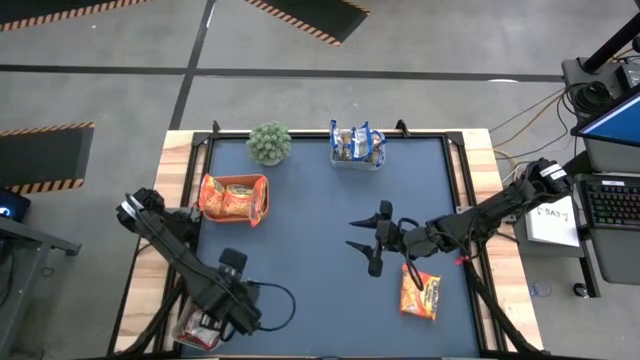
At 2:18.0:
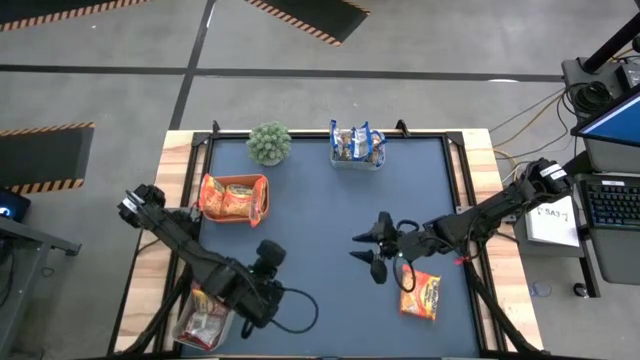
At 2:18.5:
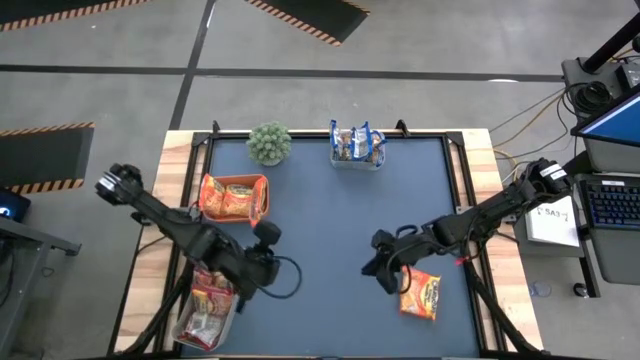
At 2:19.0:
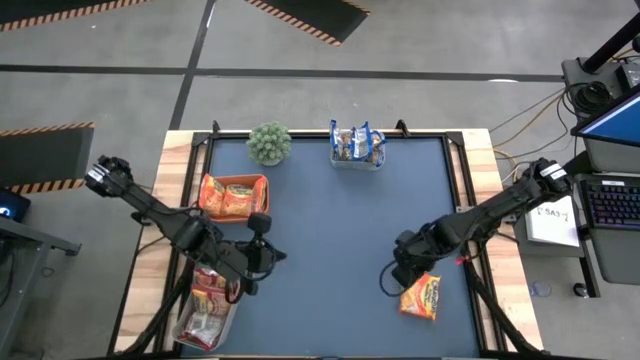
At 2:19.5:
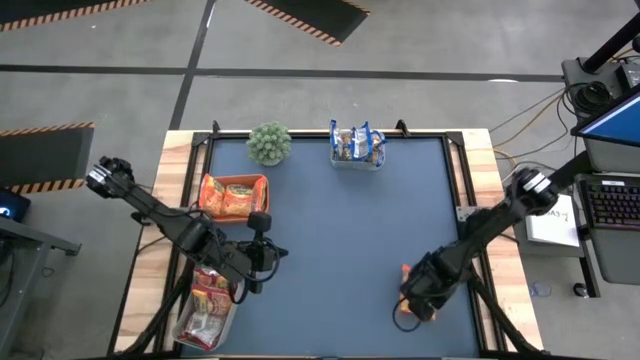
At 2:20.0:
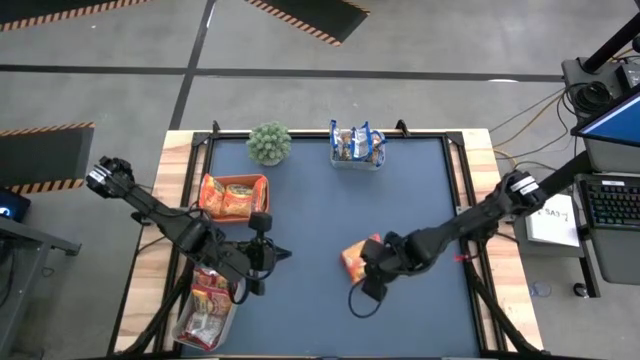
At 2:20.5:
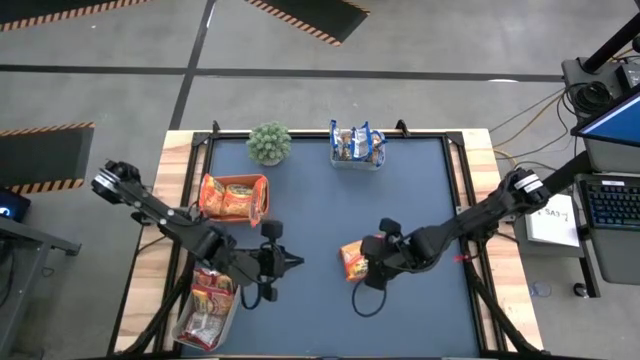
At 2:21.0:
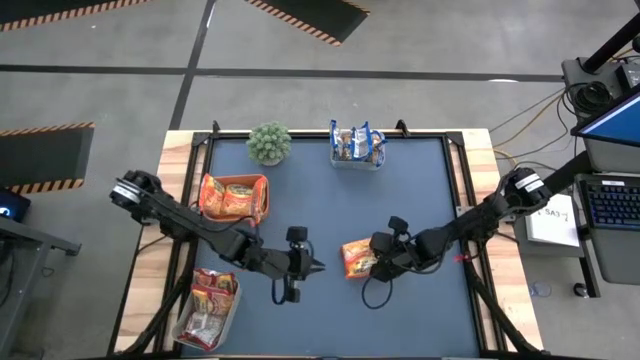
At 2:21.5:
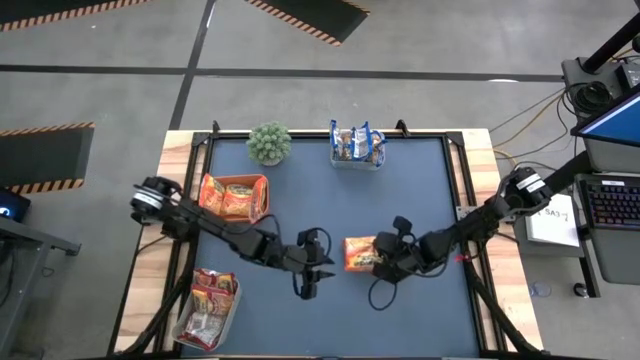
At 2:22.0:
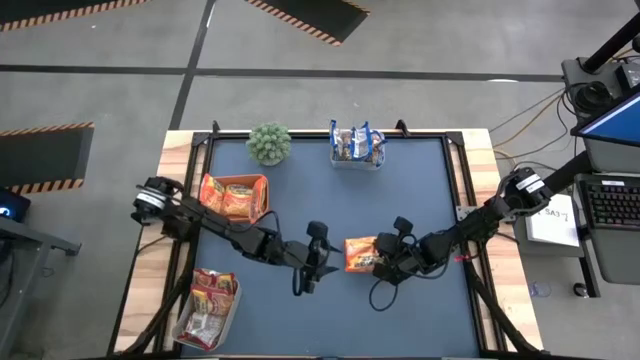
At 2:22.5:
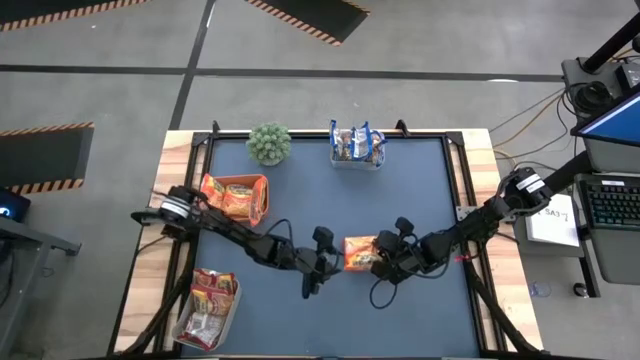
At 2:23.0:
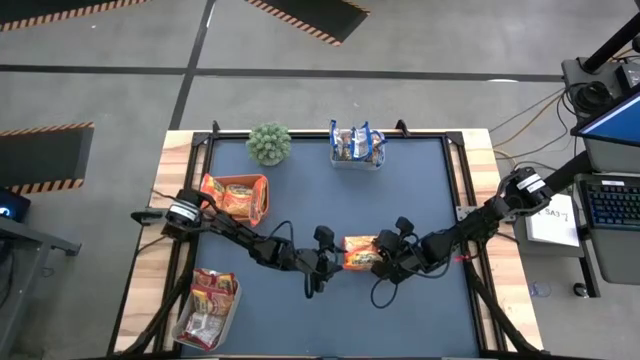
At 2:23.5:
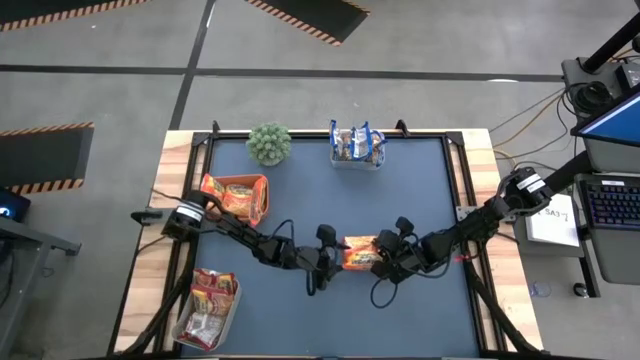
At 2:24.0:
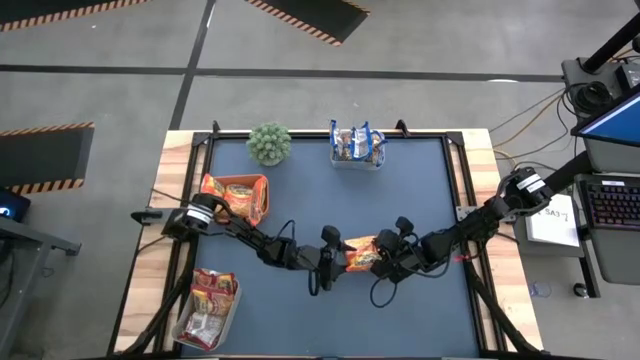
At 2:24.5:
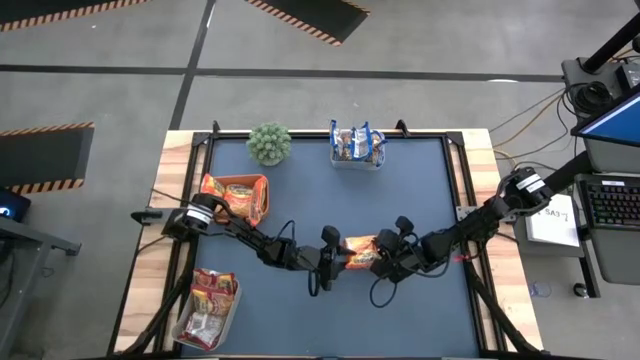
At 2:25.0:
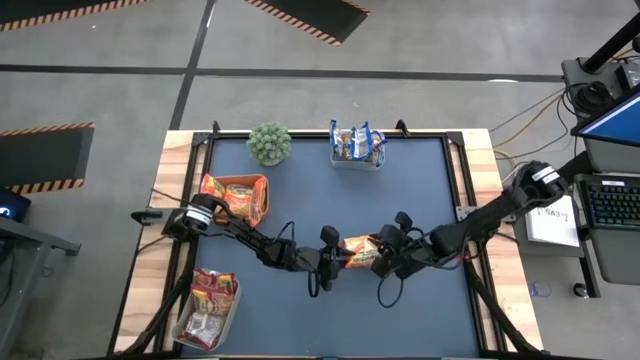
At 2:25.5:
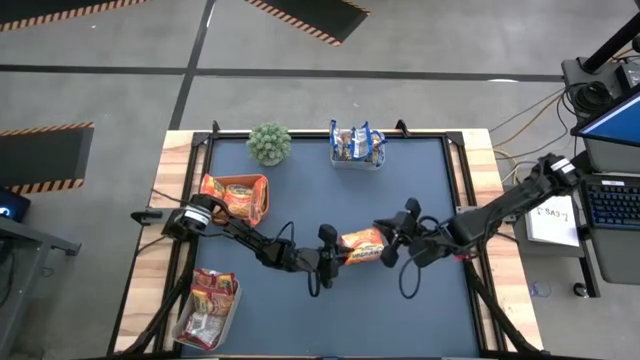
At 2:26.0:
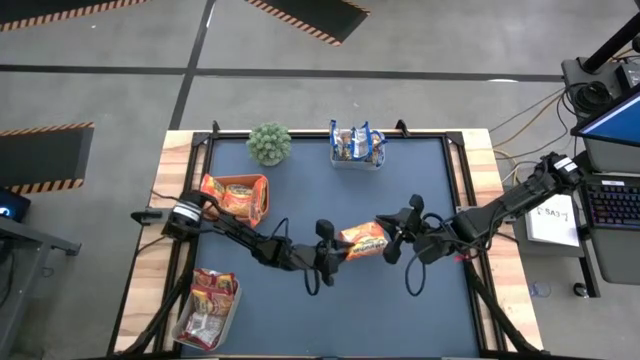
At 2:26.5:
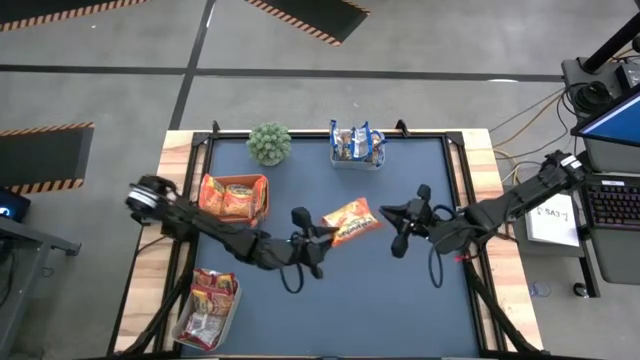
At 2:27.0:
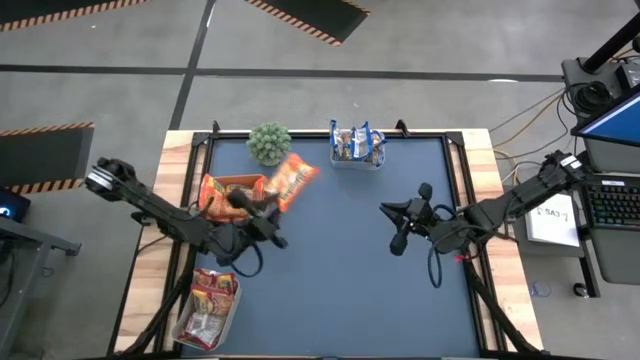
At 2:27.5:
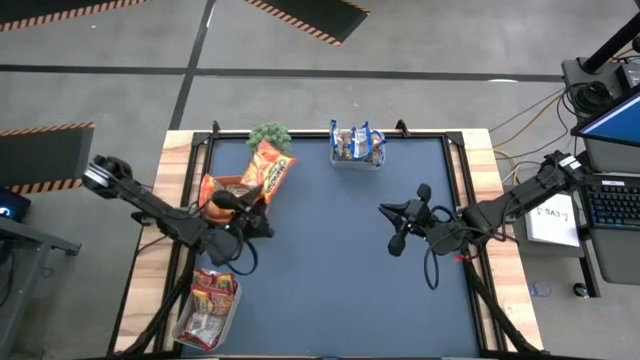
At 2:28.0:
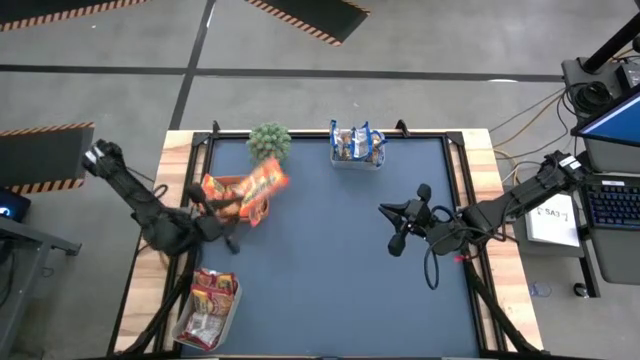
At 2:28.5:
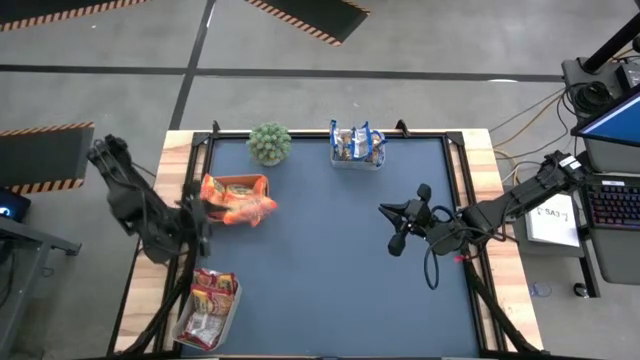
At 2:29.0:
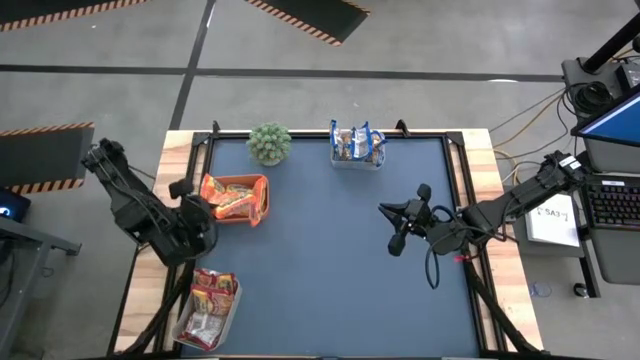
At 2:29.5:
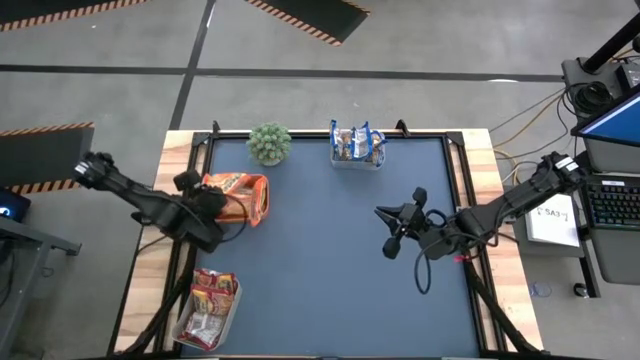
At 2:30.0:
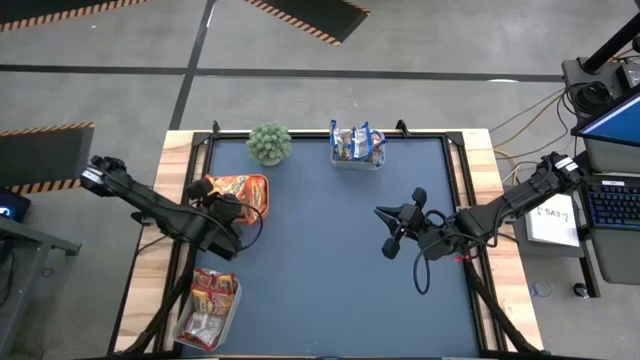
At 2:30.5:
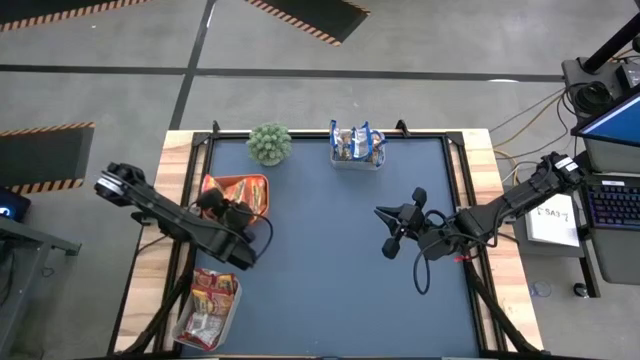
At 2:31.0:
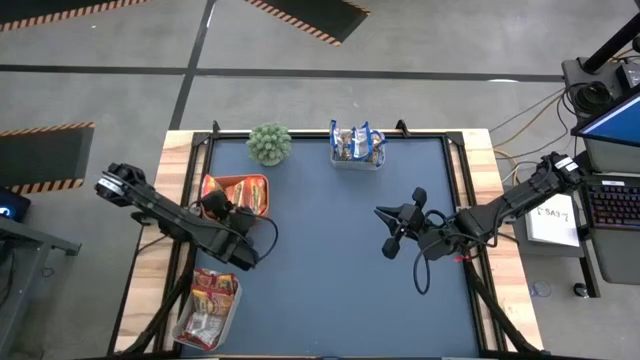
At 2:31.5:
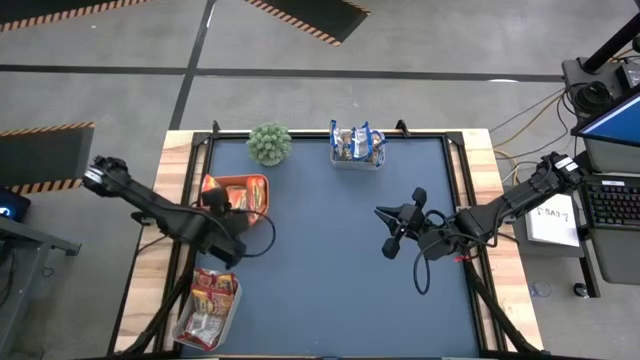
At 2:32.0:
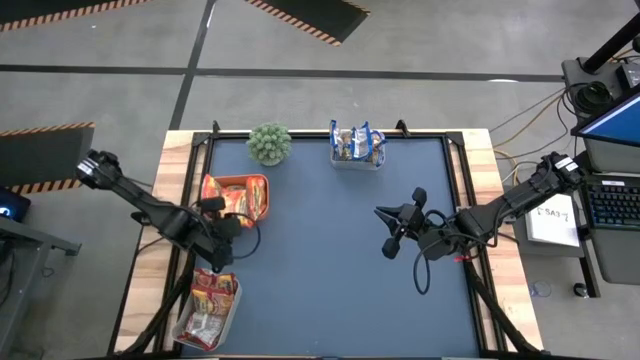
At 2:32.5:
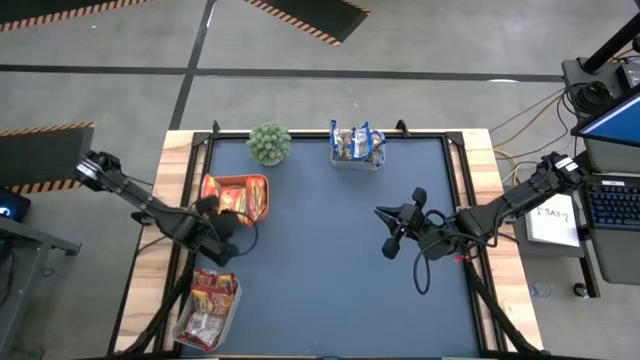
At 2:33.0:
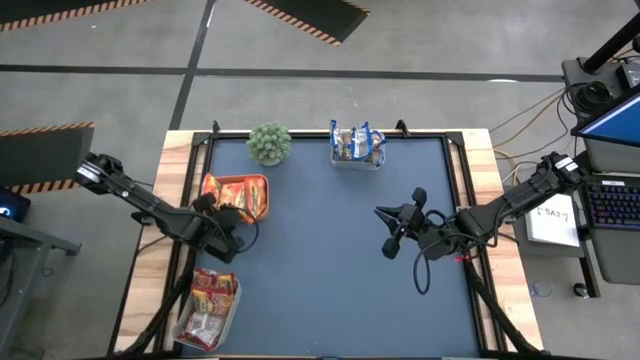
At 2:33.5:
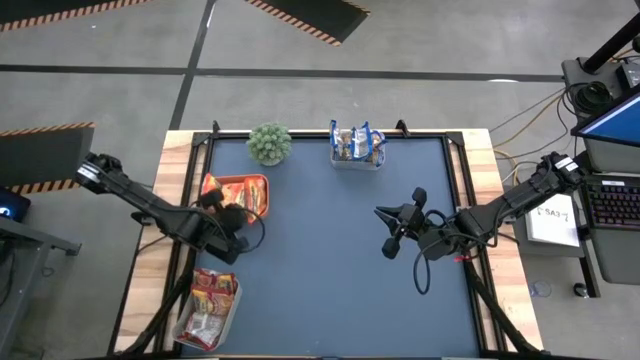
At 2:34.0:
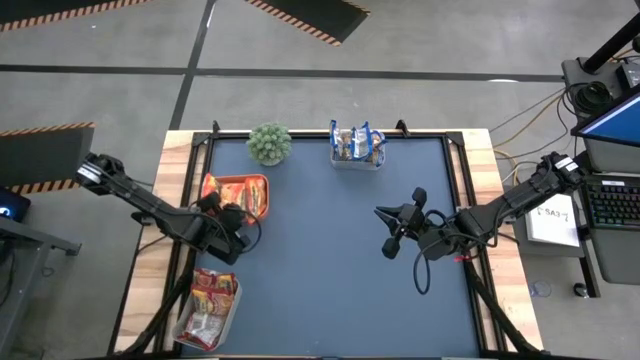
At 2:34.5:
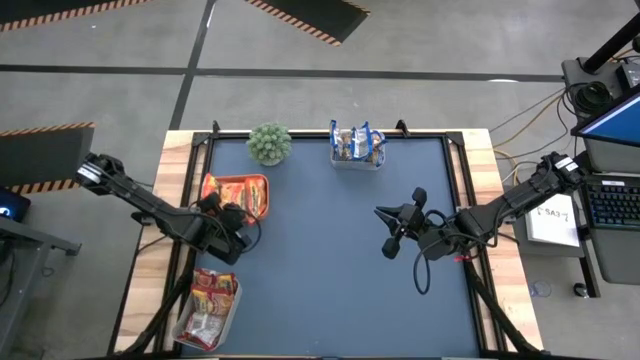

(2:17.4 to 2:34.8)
Task: Sort Maruchan noodles
Put the orange noodle pack into the orange bin

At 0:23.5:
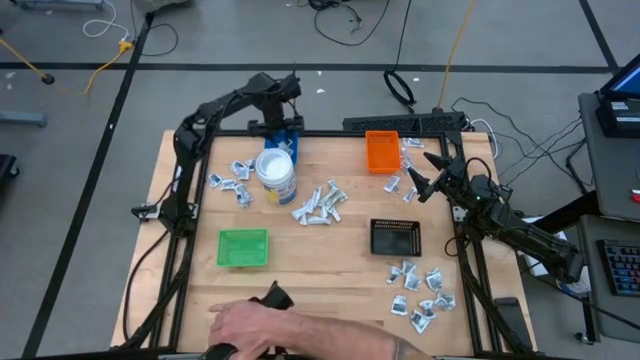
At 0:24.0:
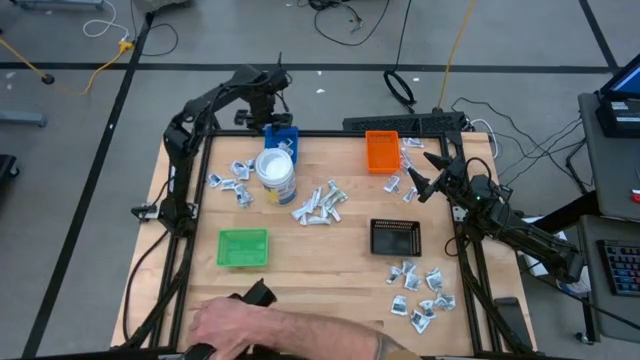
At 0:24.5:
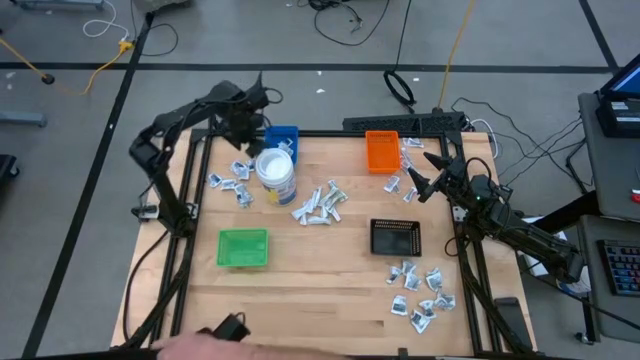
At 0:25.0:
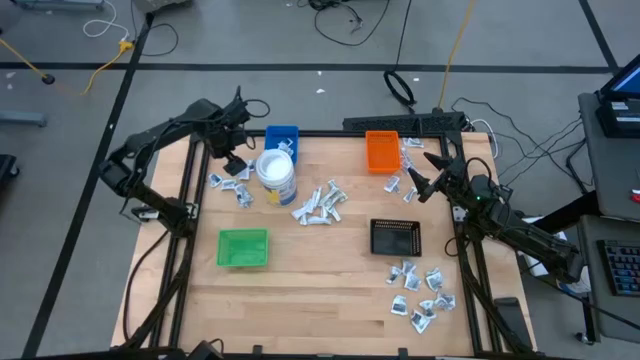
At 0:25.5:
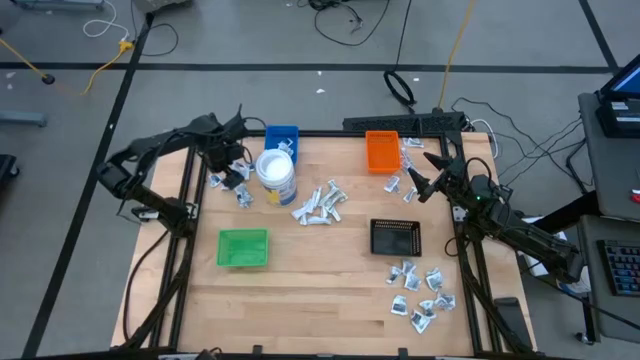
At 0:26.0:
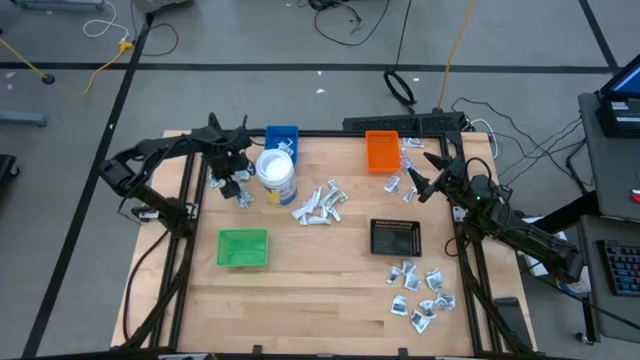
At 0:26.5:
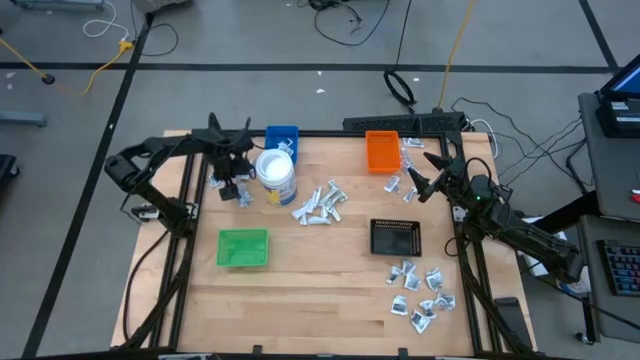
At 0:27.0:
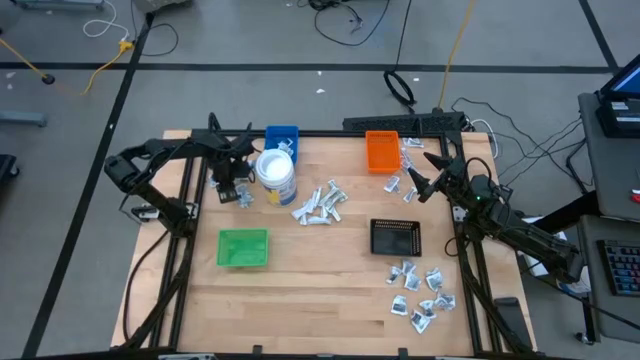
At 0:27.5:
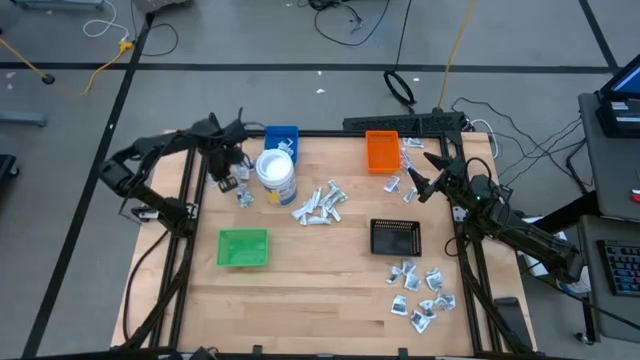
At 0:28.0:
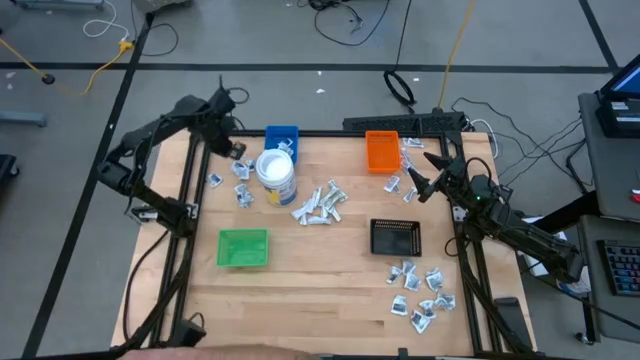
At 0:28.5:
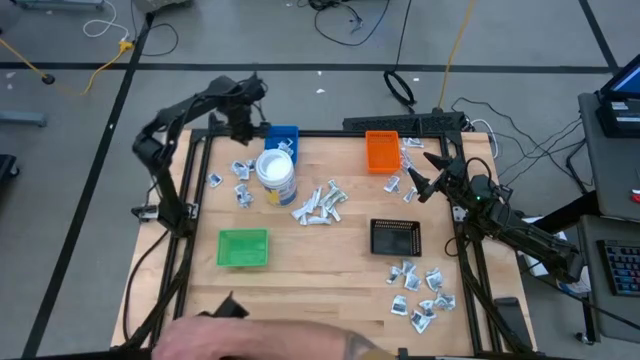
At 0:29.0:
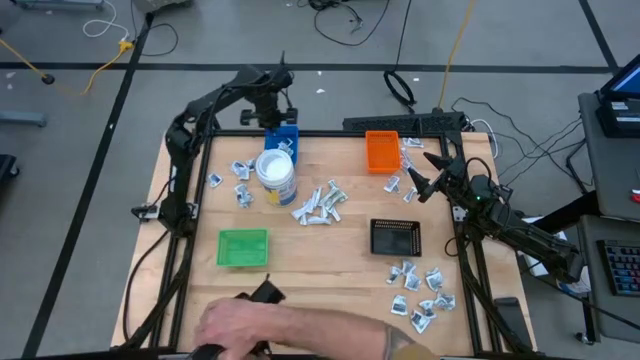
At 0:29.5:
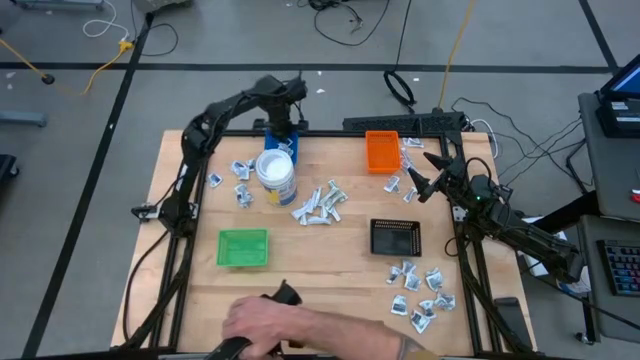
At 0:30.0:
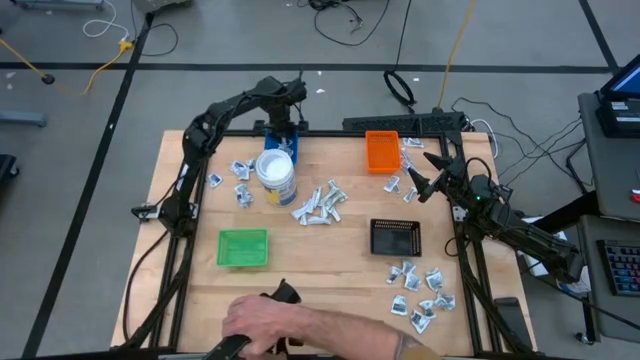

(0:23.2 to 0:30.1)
Task: Pick & Place First Aid Supplies
Put the blue alcohol pad into the blue bin
